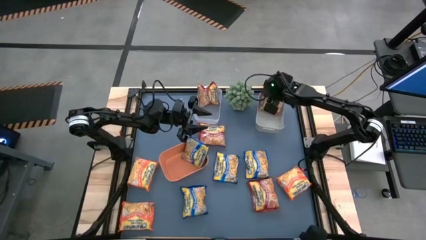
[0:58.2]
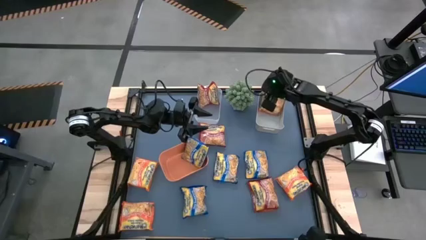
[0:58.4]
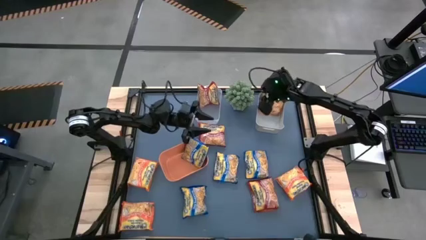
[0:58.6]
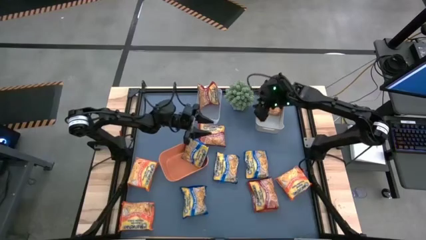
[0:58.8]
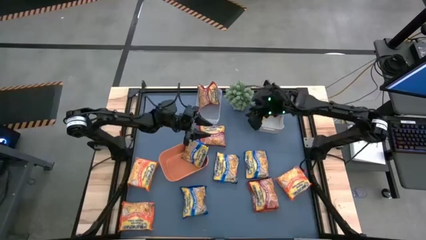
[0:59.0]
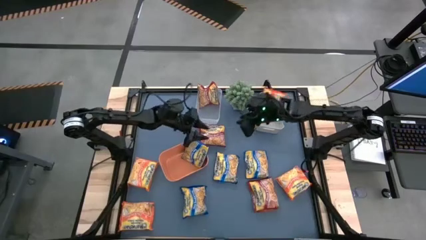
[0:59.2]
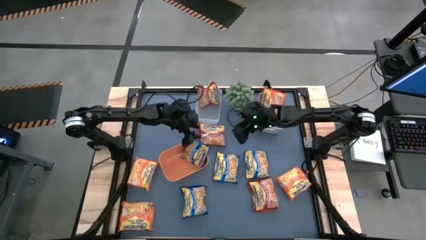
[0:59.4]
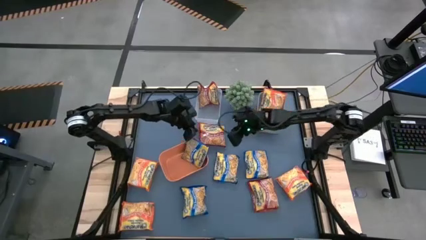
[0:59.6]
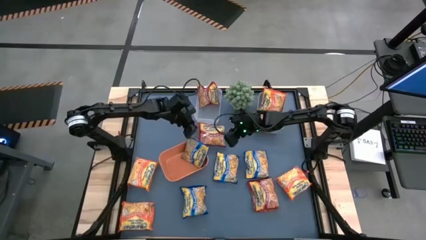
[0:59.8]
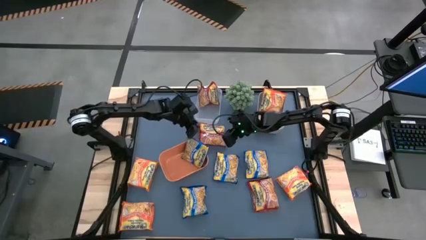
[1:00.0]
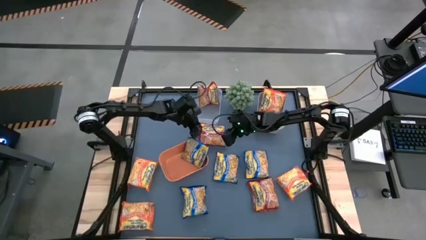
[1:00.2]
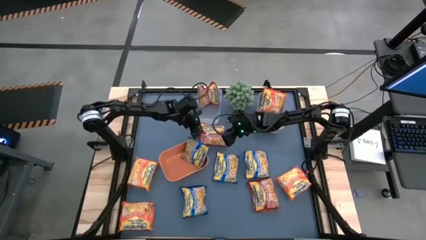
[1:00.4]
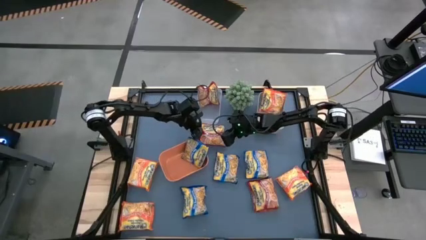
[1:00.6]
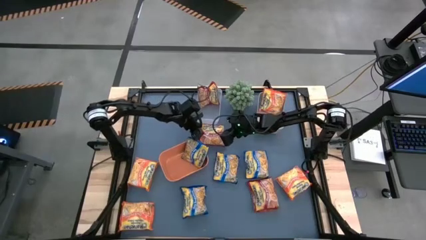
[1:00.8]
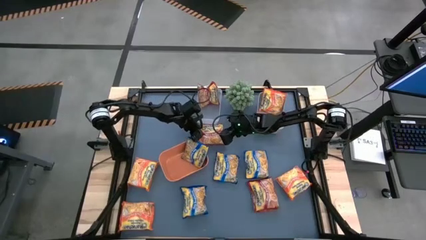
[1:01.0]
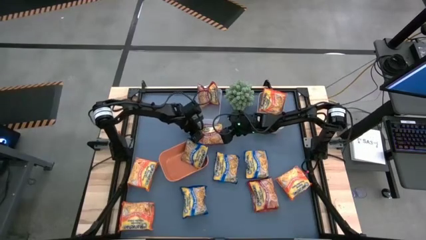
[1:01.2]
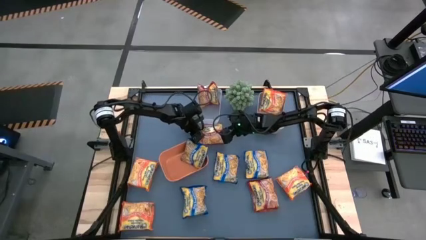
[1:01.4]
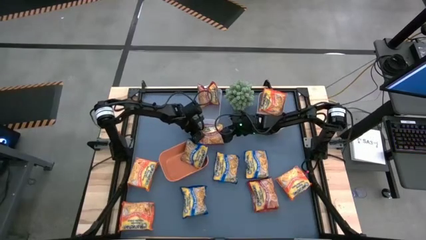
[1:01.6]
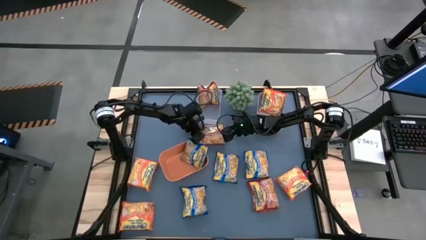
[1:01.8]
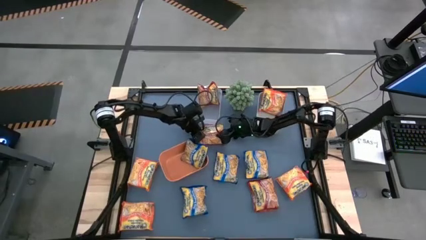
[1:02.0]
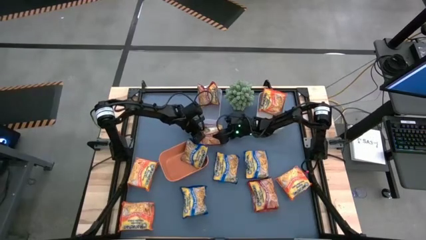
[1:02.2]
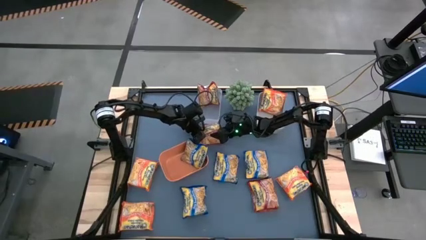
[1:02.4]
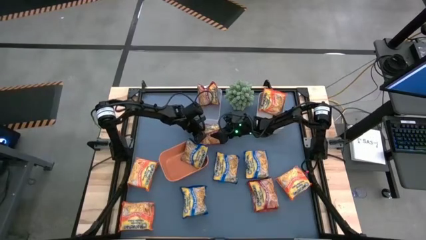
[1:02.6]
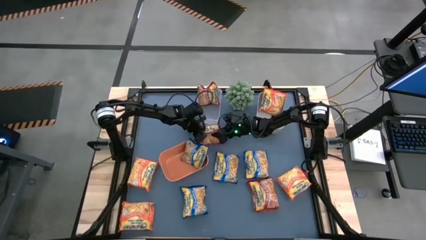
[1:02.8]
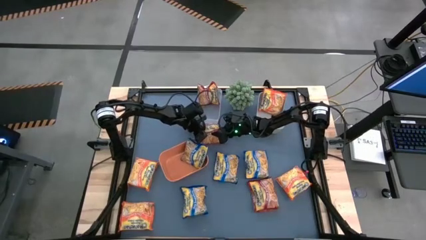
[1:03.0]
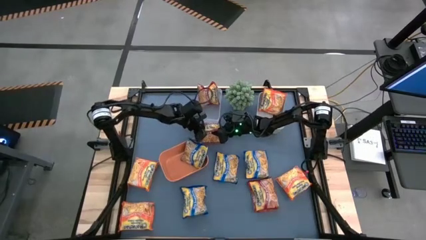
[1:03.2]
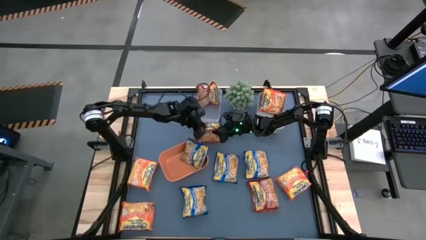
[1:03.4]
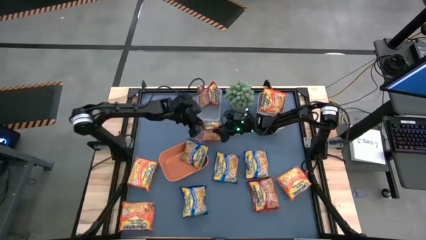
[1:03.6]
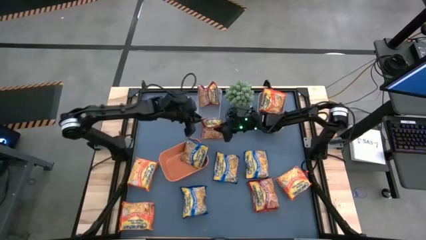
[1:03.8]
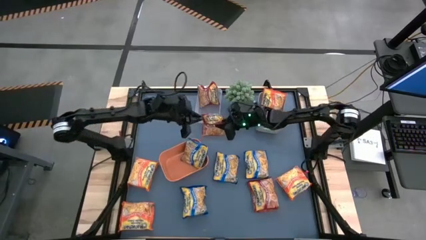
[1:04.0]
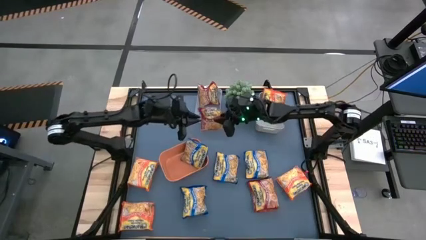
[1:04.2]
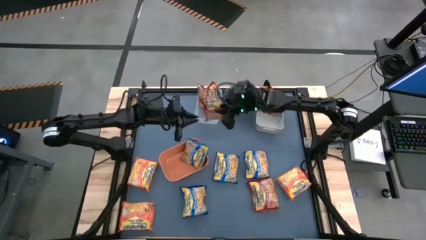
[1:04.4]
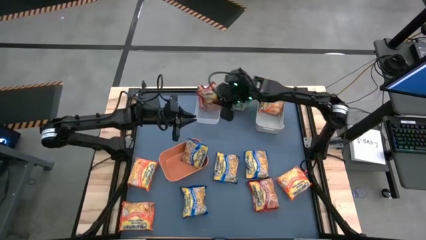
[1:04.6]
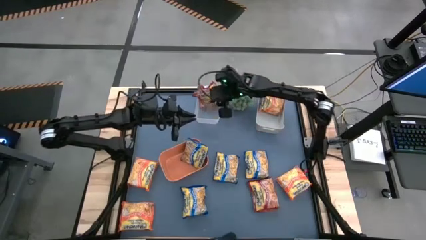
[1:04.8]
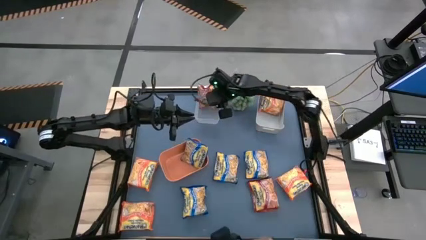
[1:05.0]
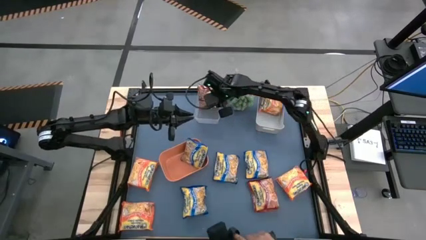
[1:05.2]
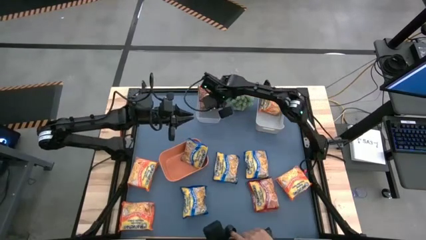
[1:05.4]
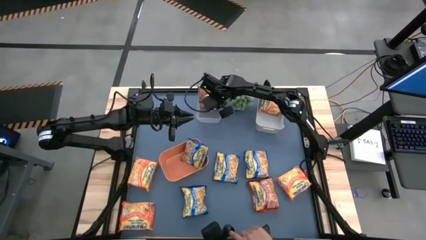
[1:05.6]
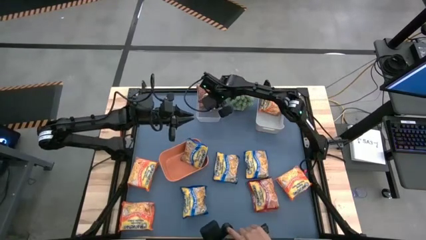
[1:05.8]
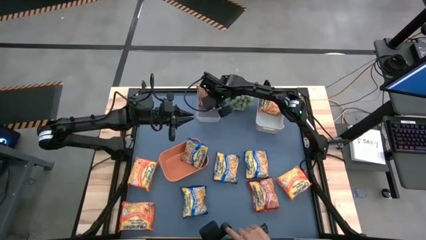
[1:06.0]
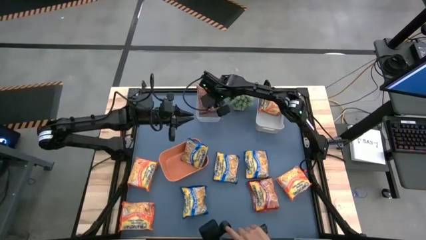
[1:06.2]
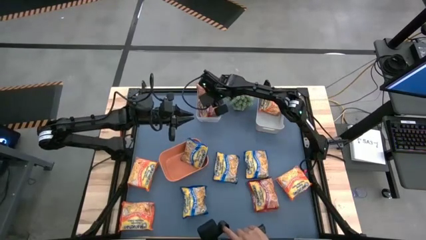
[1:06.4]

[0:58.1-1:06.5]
Task: Sort Maruchan noodles
Put the red noodle pack into the transparent bin

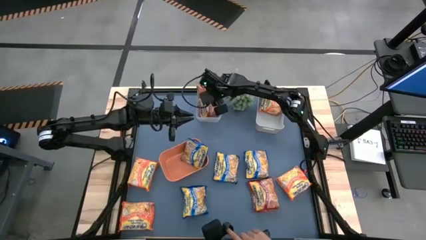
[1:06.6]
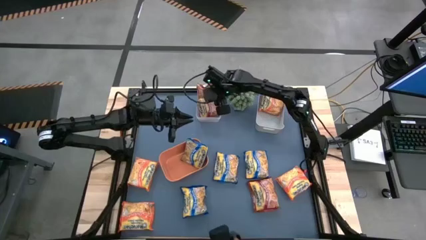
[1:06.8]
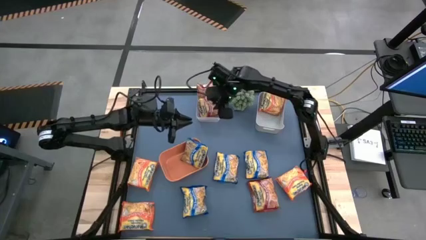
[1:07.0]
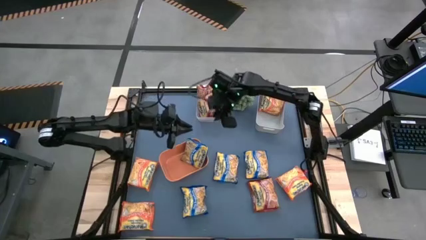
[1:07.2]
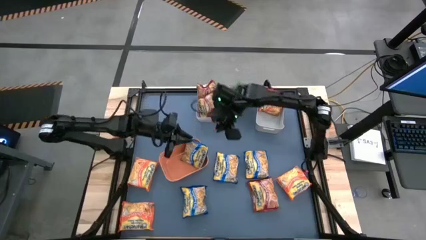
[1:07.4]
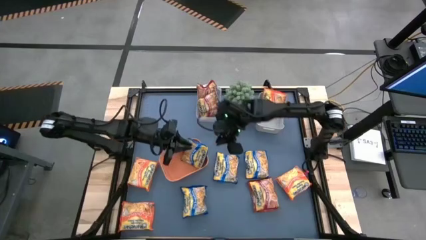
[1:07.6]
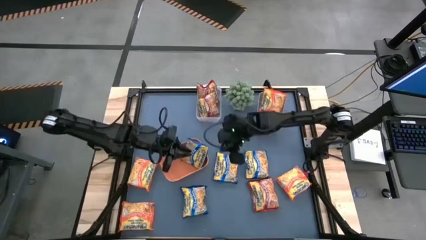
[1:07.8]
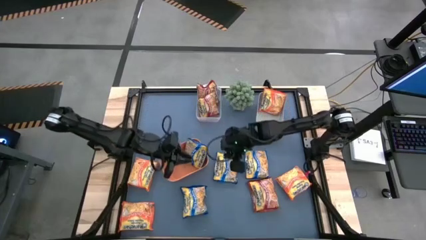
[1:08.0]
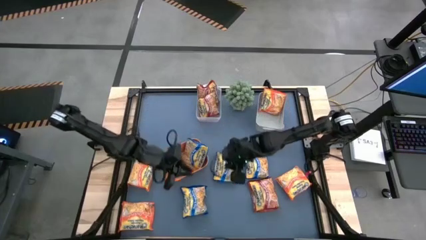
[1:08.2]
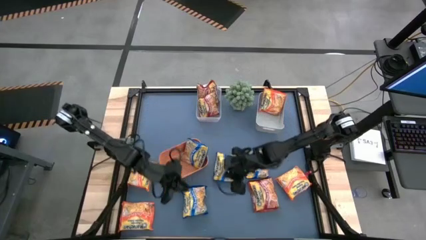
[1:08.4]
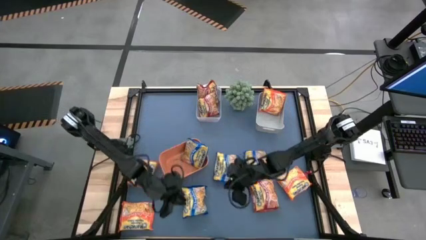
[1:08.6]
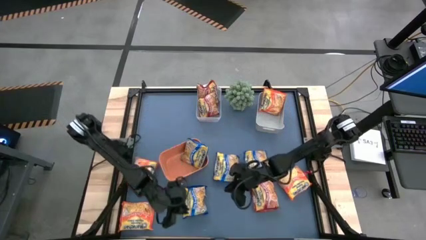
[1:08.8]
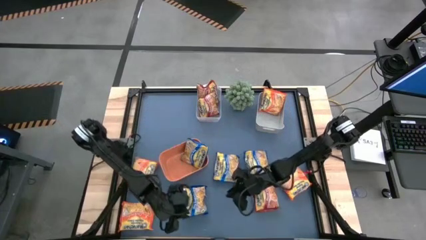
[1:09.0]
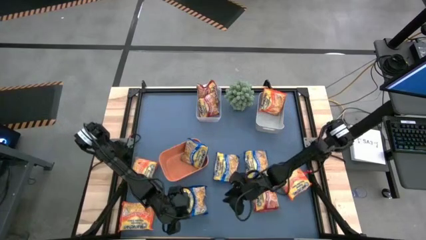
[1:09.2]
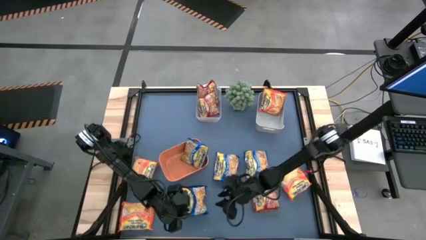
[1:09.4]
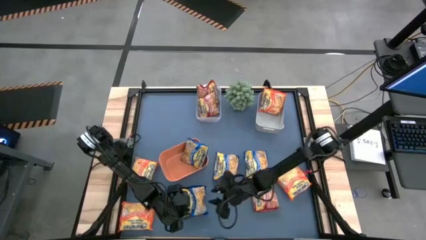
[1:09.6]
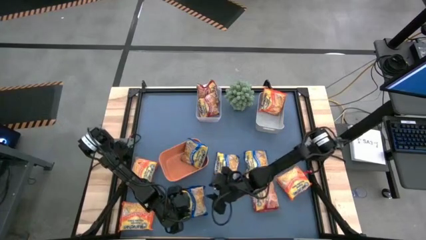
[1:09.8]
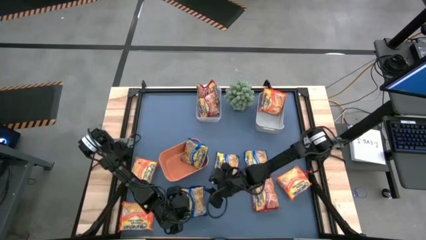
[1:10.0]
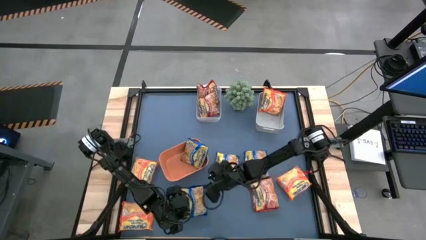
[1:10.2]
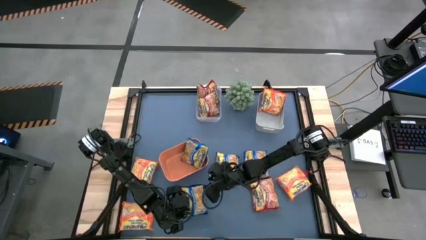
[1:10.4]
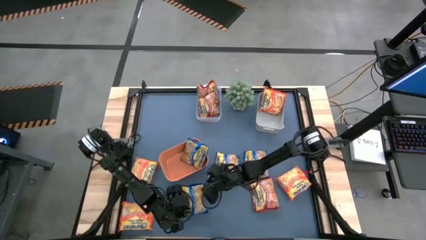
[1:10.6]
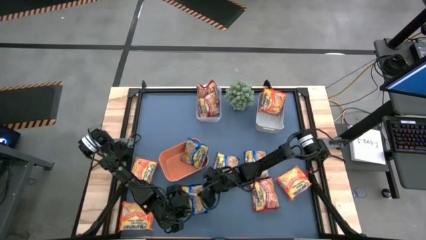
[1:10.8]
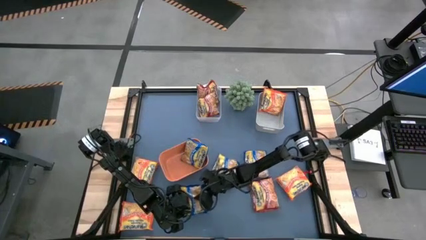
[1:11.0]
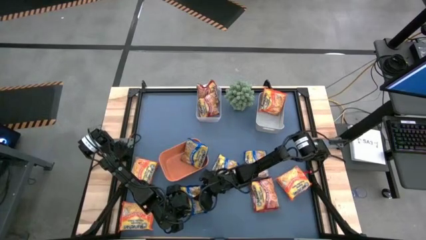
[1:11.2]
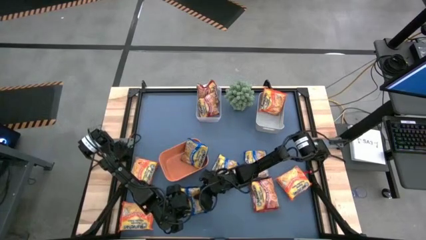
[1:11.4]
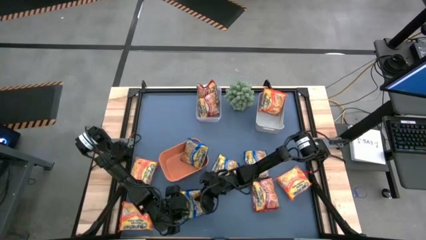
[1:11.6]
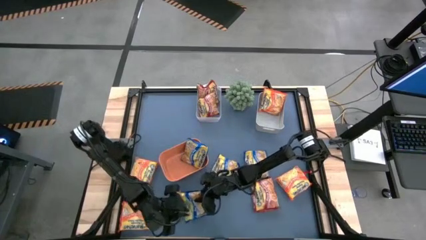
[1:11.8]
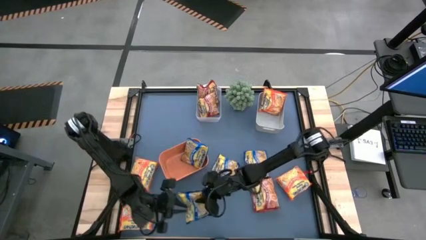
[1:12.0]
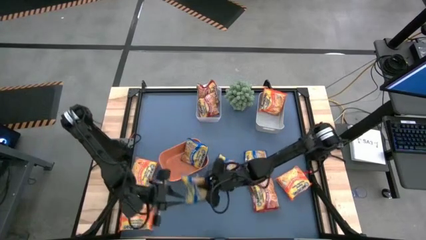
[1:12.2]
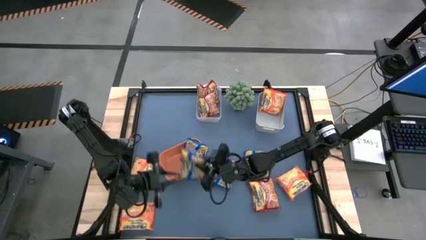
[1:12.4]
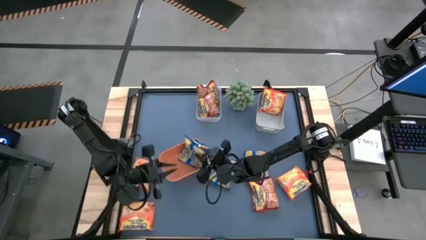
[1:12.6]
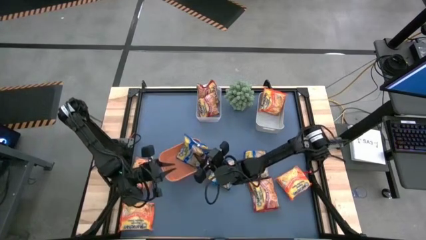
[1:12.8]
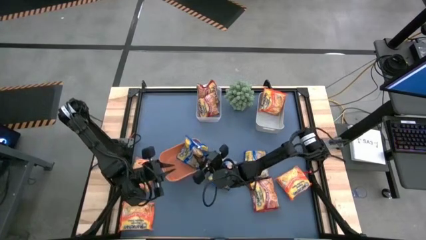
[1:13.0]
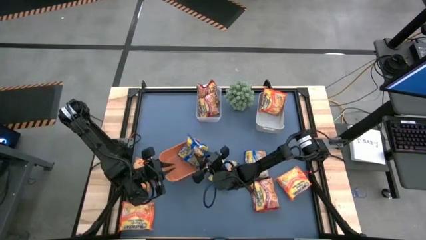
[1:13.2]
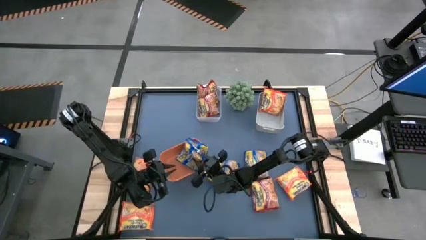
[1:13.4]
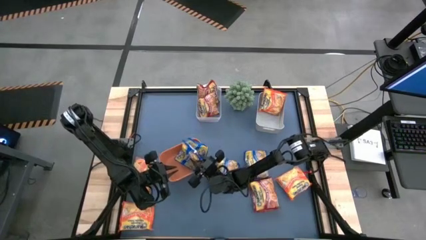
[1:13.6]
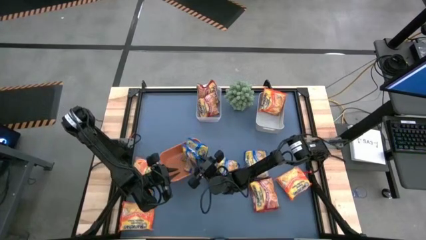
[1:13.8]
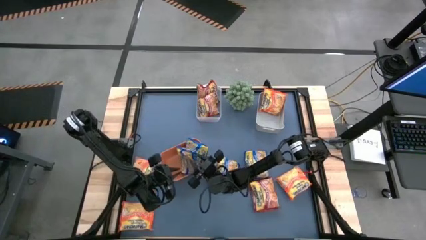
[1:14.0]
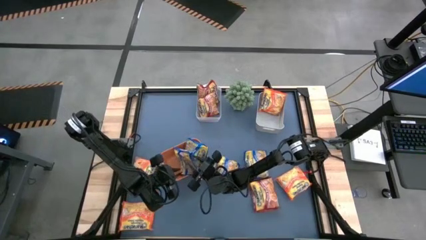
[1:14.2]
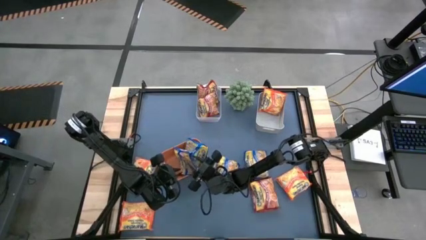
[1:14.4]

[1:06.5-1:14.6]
Put the blue noodle pack into the orange bin
